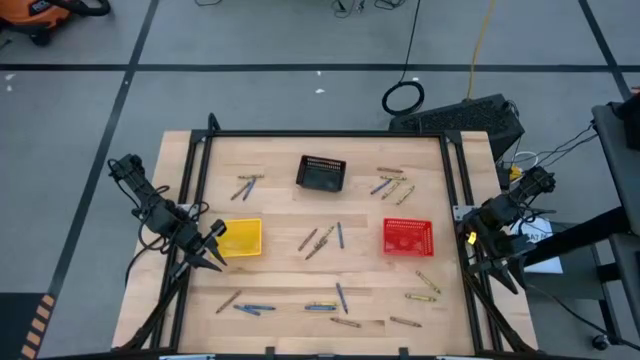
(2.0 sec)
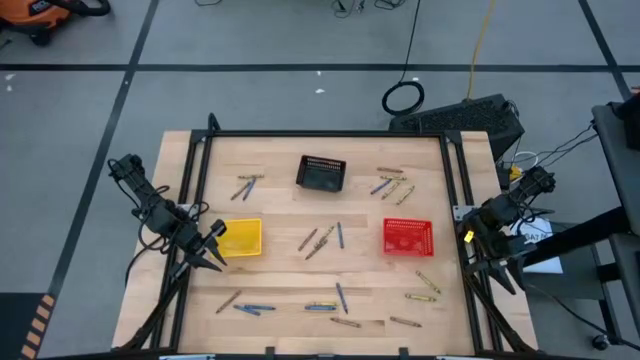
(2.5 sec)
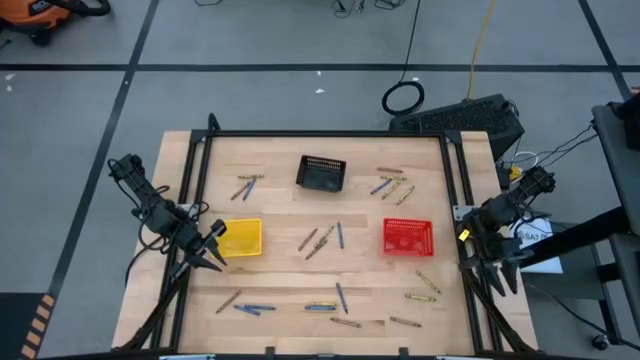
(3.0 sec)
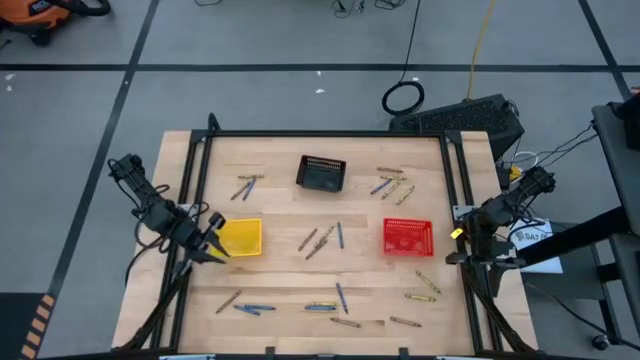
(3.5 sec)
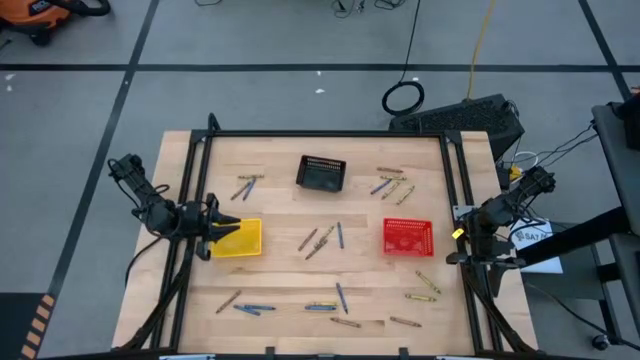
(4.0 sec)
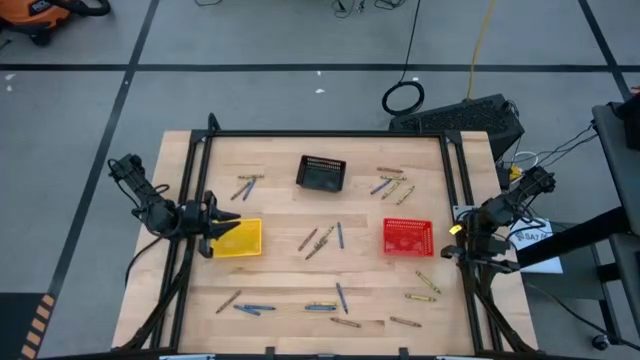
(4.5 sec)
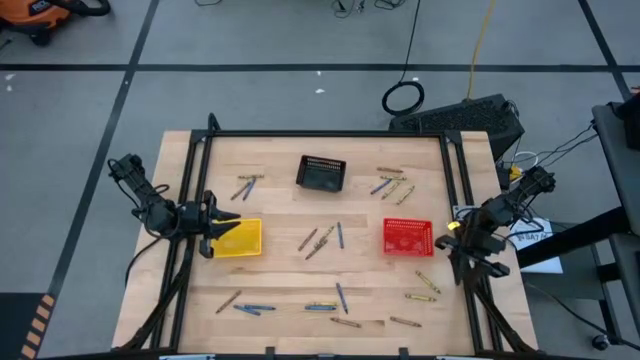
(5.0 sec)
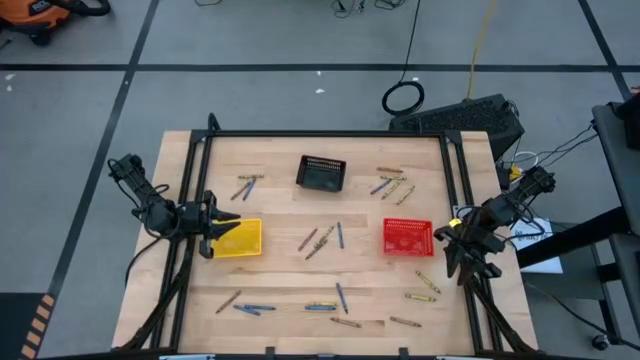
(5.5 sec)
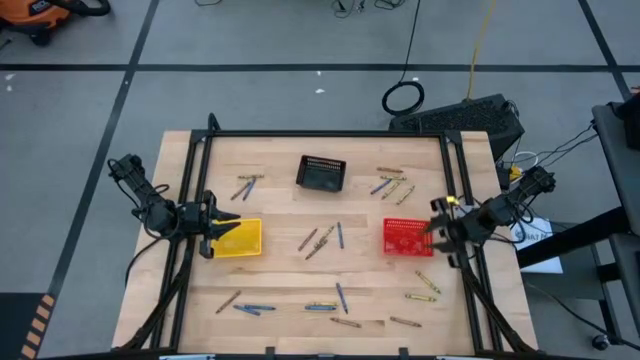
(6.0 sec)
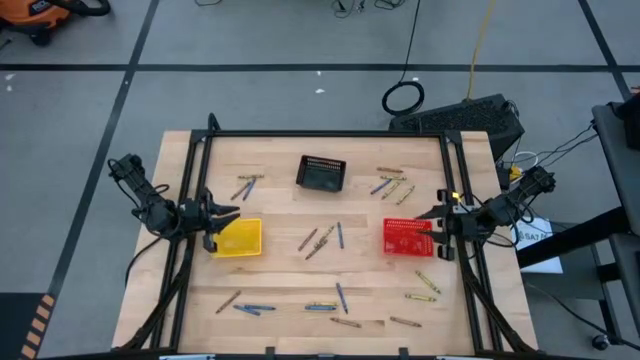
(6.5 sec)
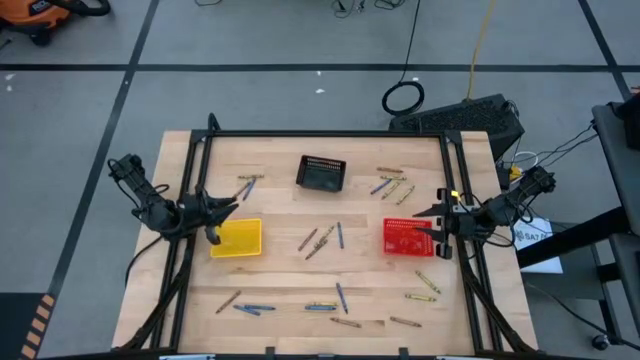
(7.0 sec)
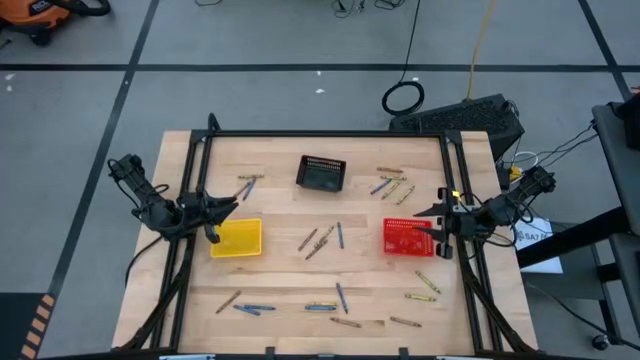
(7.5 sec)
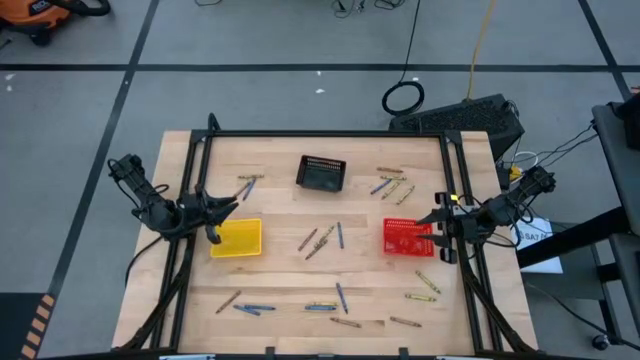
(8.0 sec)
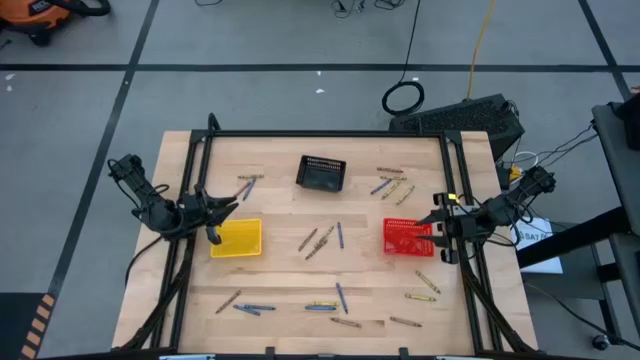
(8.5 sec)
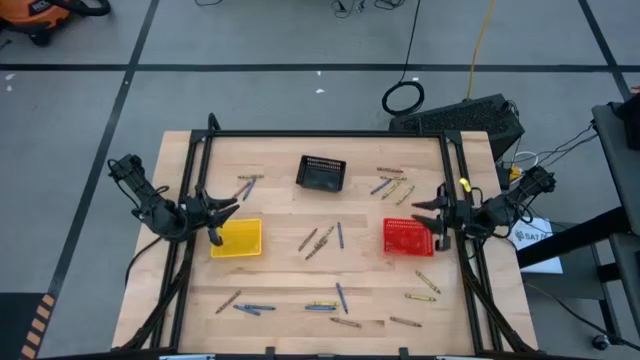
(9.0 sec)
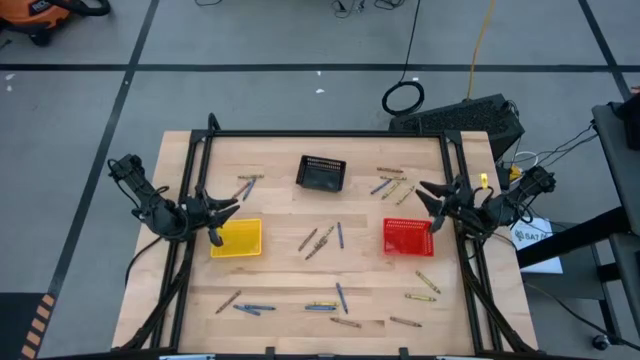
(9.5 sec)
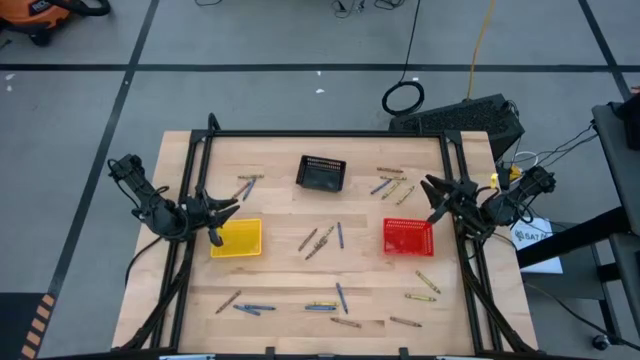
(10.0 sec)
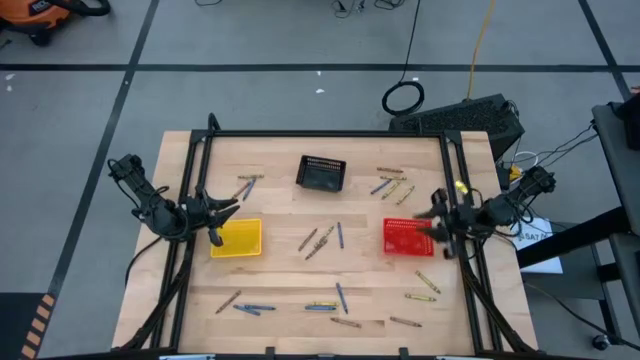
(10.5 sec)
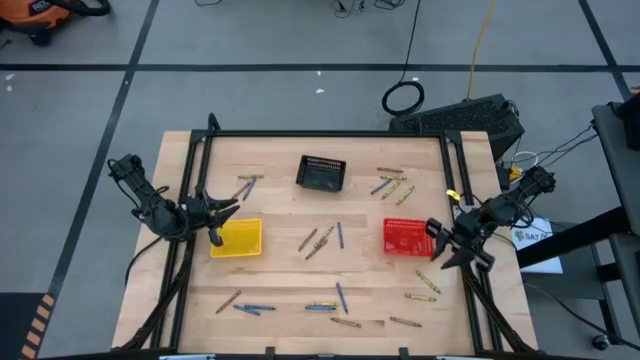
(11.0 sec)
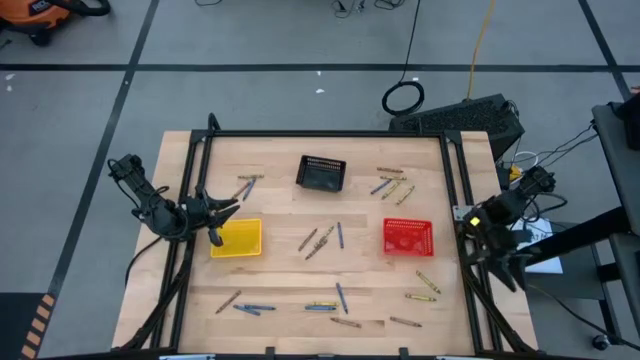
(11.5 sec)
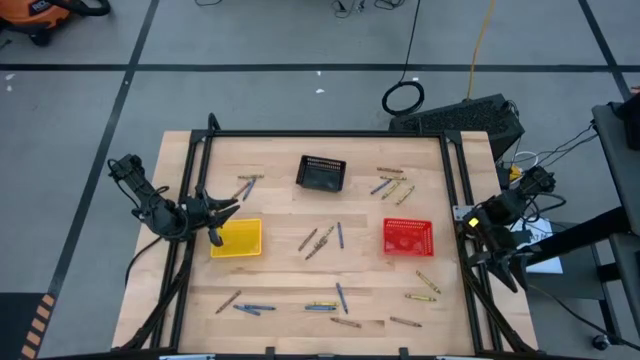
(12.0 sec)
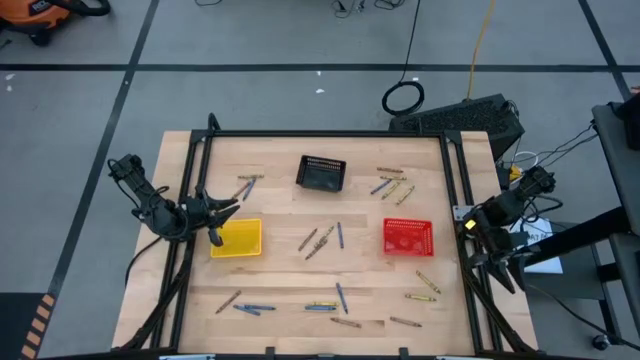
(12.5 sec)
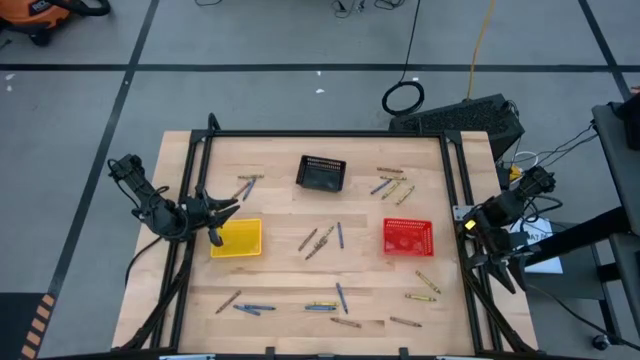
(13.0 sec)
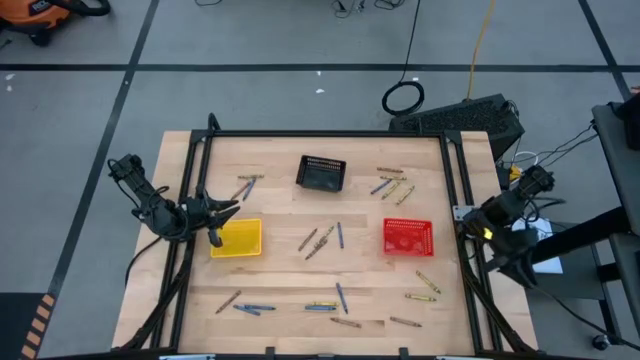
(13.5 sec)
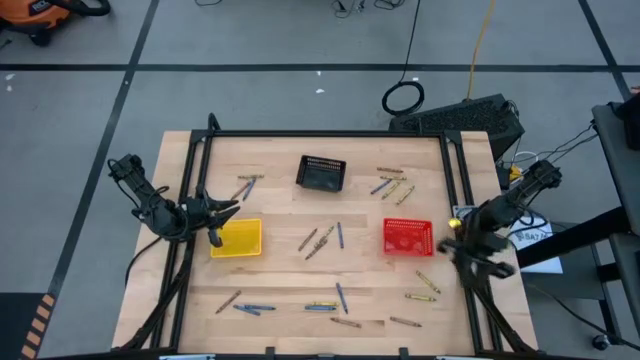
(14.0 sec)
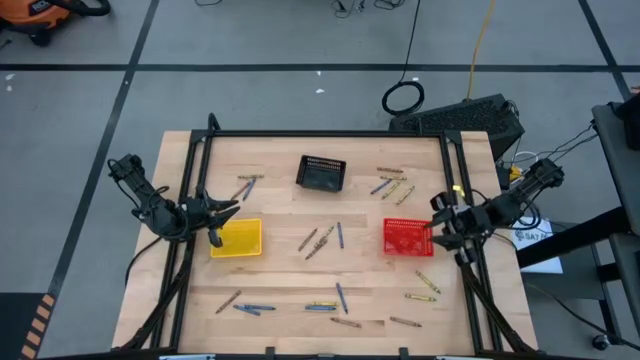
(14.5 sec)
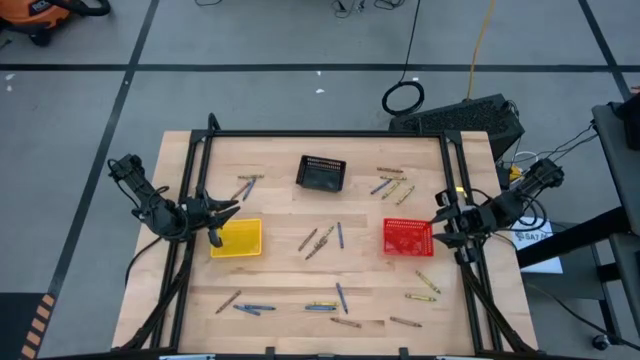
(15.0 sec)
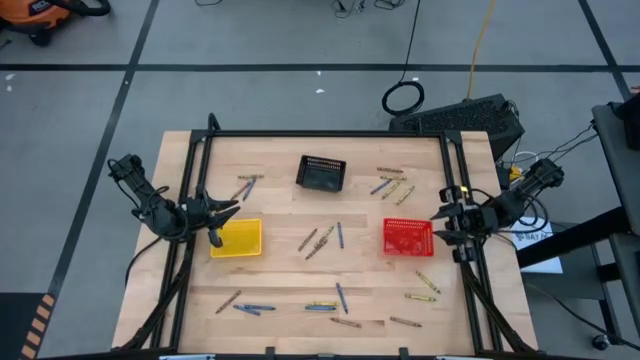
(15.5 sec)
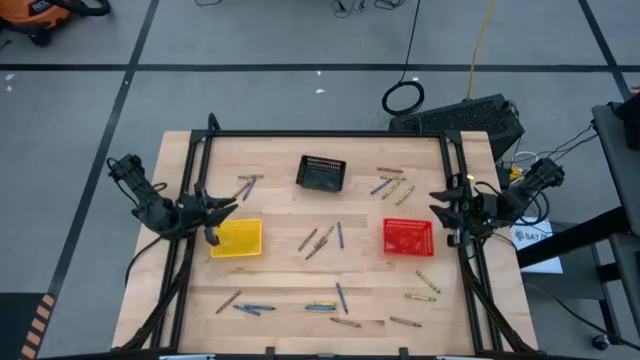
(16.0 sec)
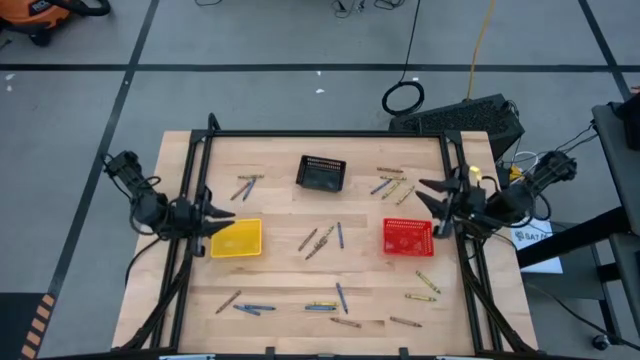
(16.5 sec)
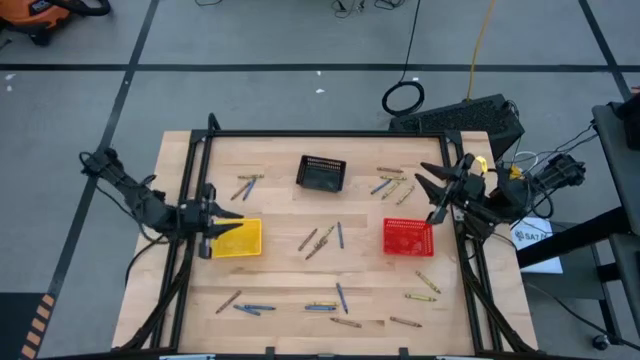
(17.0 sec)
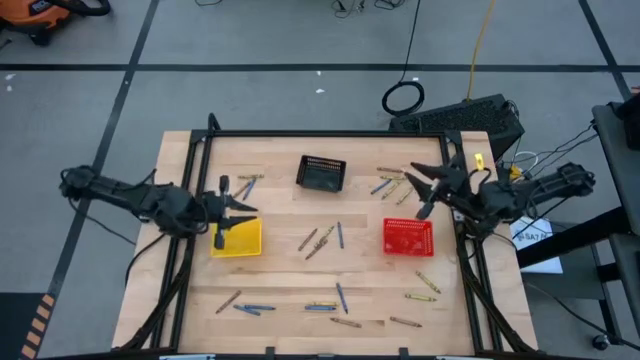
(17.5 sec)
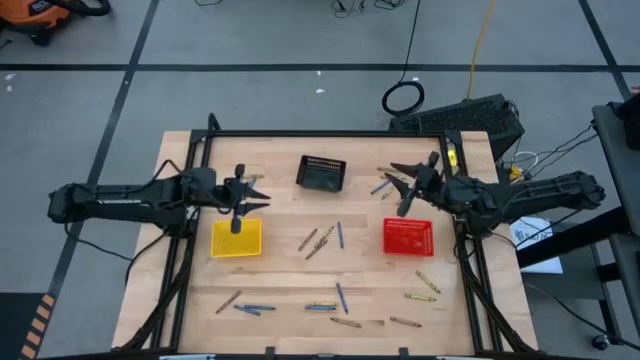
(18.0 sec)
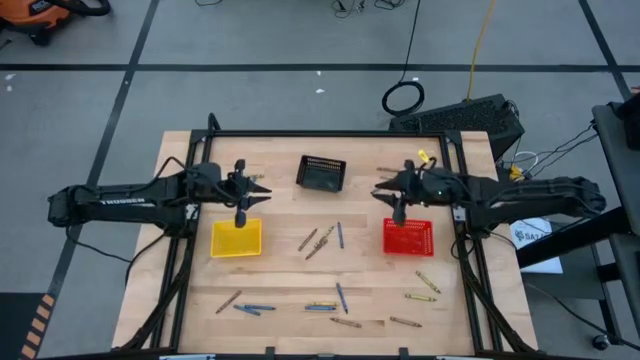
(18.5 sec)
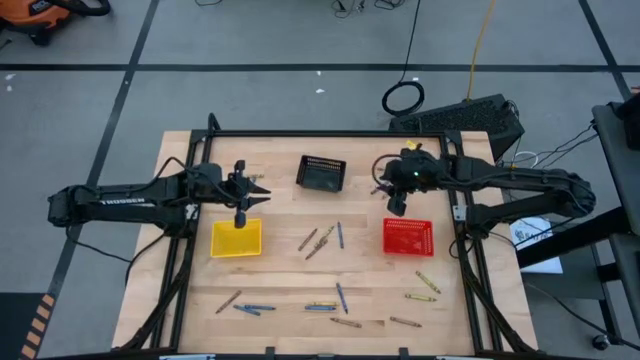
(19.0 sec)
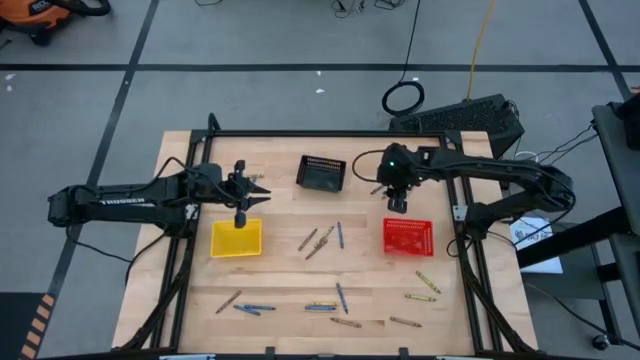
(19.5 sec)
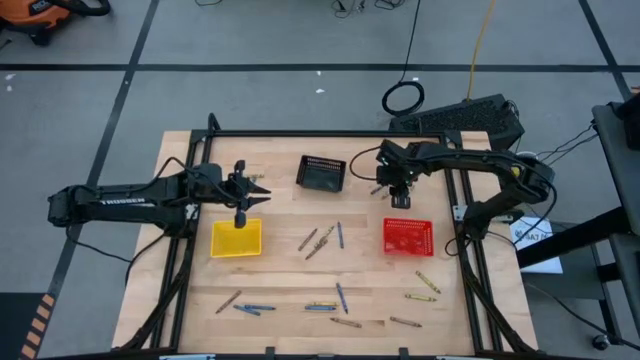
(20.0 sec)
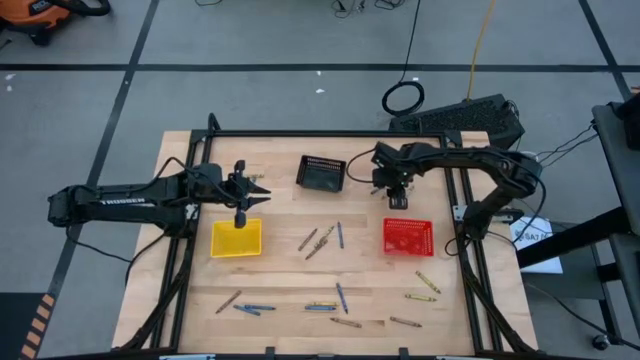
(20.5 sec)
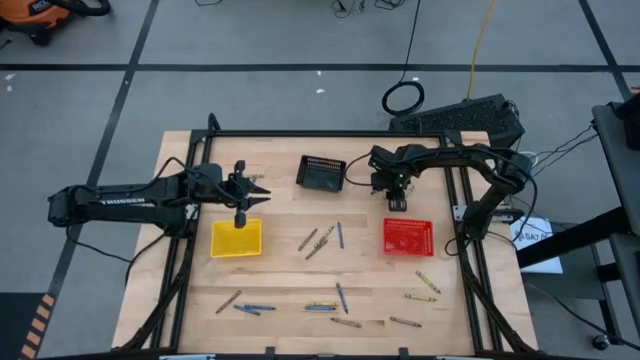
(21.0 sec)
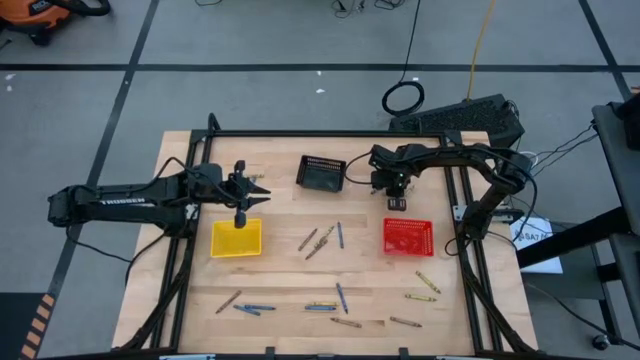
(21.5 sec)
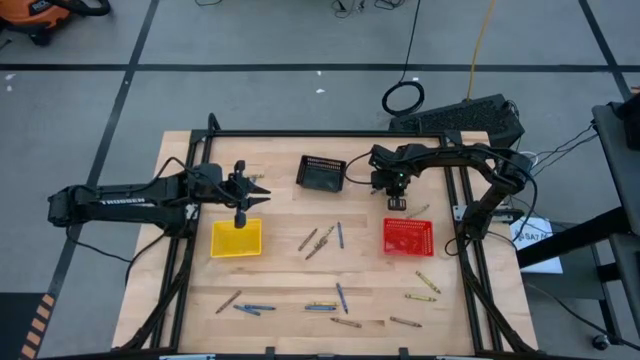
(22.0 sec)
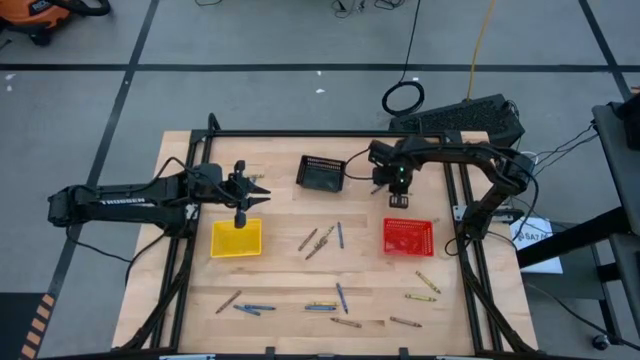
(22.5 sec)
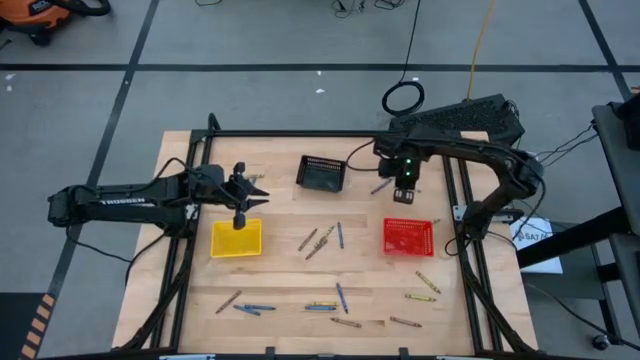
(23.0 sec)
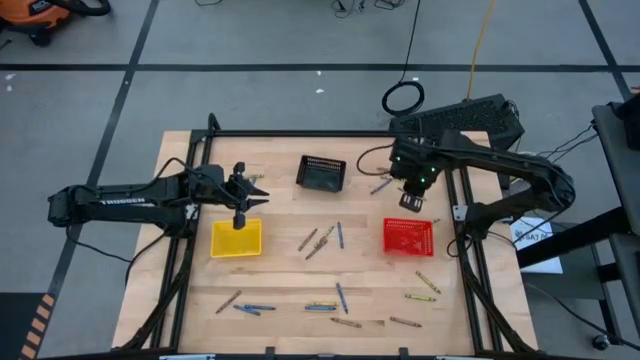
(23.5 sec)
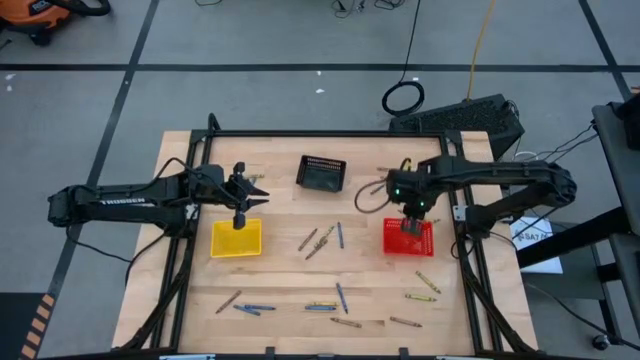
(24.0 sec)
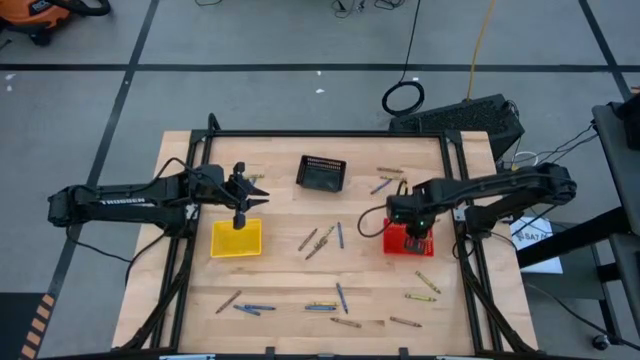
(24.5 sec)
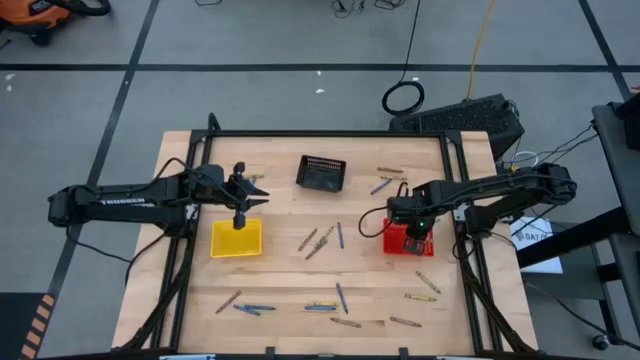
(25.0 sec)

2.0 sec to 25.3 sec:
Task: Sort crayons
Put the green crayon into the red bin
